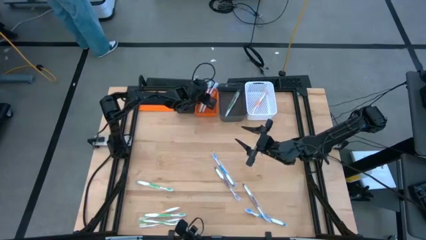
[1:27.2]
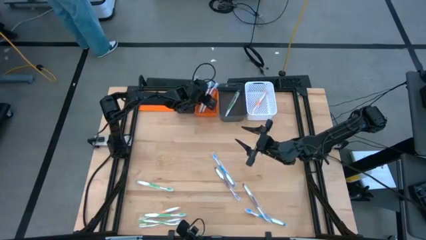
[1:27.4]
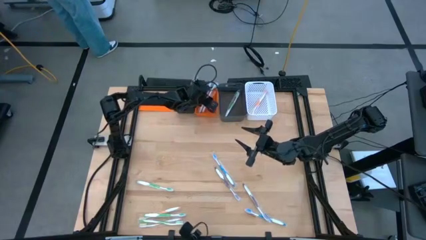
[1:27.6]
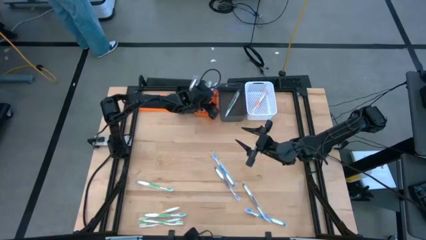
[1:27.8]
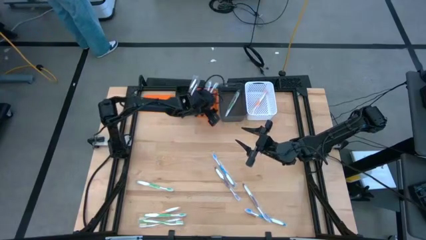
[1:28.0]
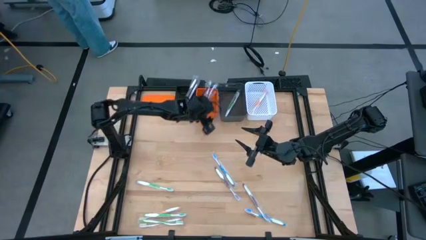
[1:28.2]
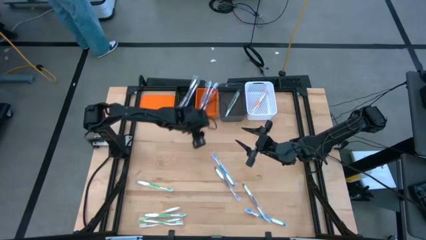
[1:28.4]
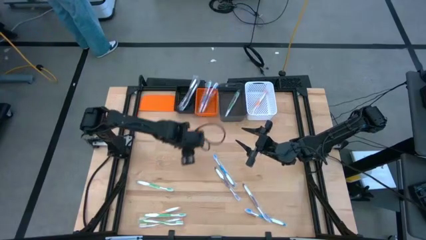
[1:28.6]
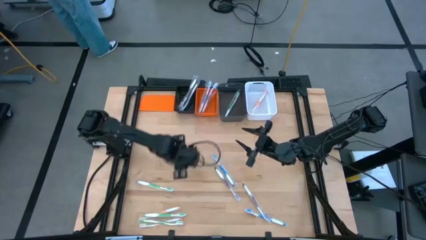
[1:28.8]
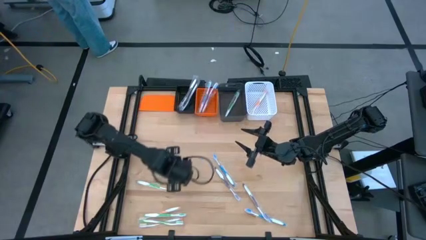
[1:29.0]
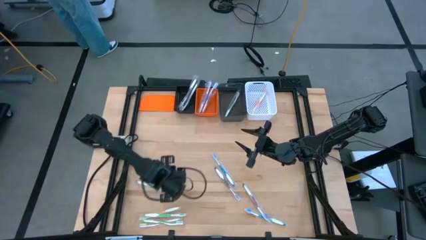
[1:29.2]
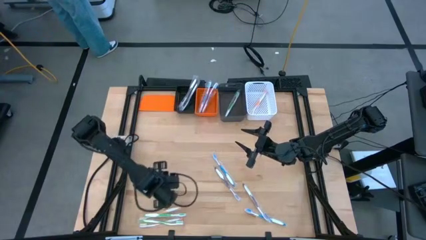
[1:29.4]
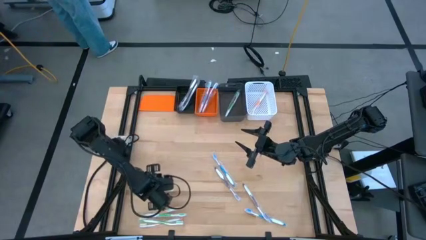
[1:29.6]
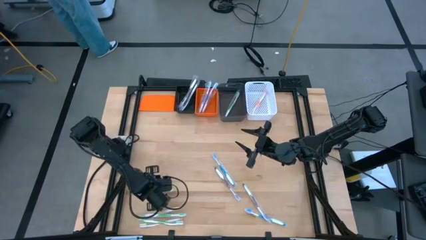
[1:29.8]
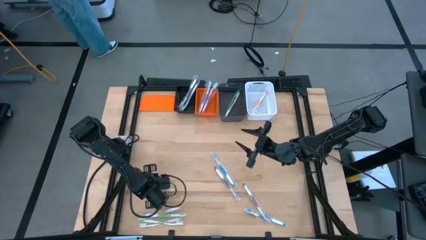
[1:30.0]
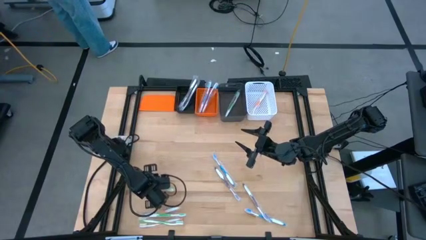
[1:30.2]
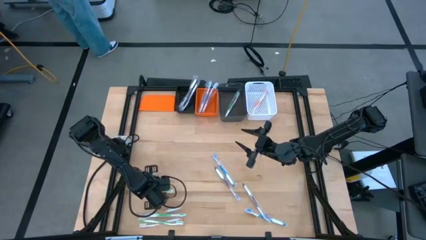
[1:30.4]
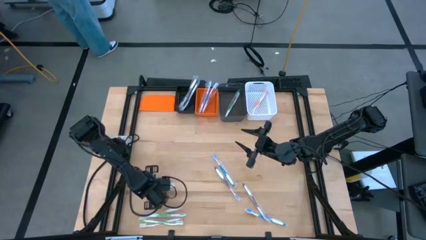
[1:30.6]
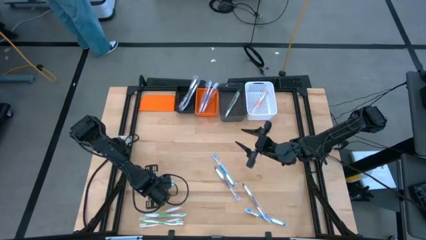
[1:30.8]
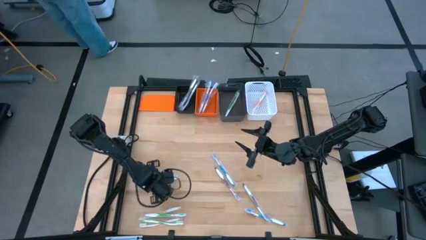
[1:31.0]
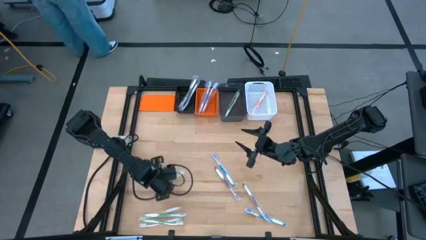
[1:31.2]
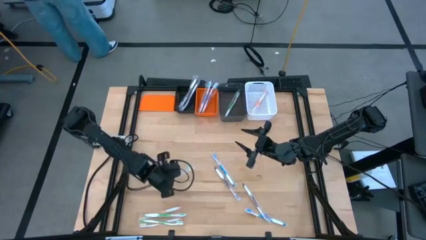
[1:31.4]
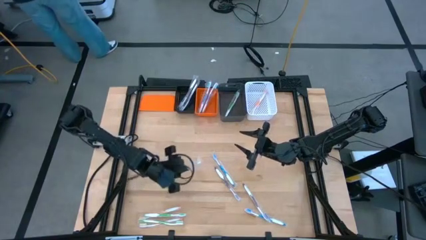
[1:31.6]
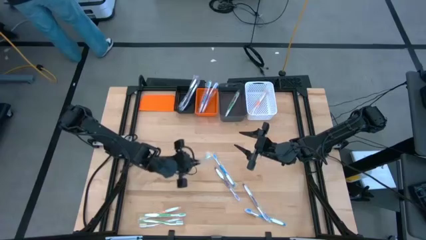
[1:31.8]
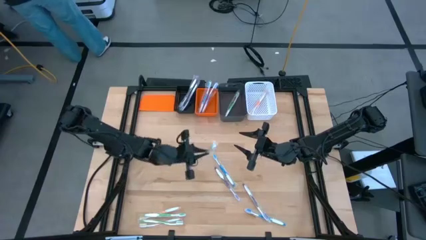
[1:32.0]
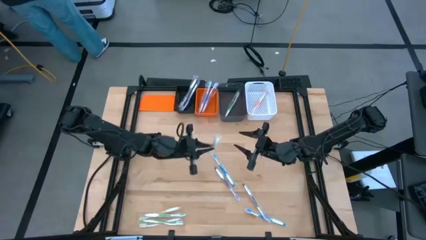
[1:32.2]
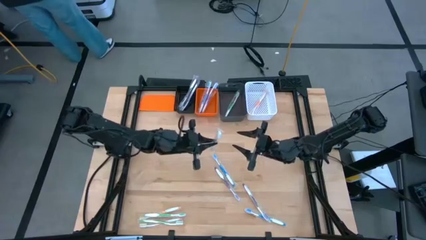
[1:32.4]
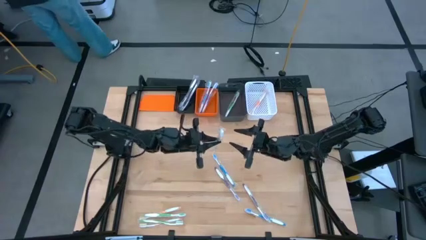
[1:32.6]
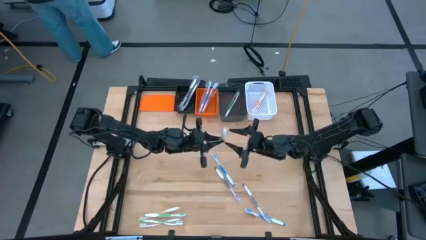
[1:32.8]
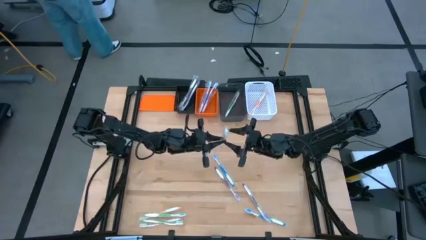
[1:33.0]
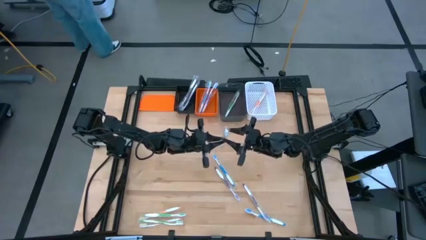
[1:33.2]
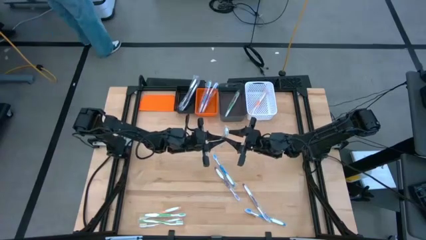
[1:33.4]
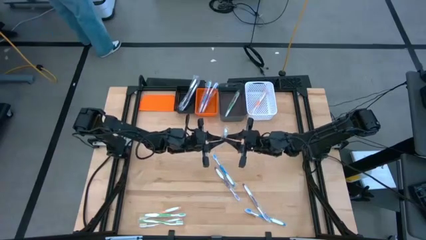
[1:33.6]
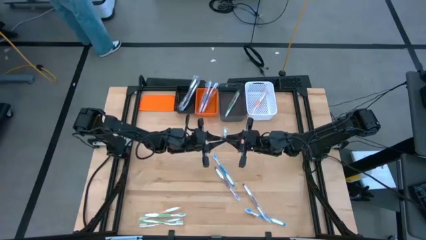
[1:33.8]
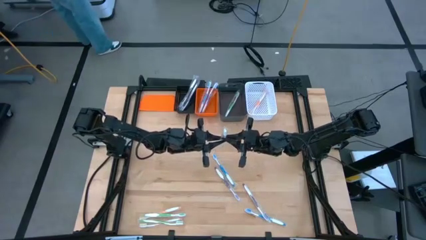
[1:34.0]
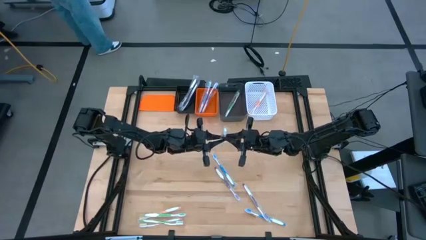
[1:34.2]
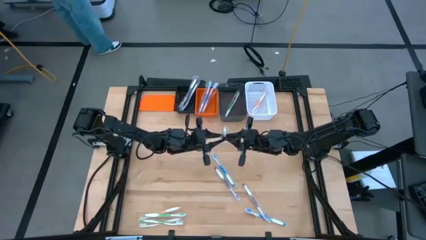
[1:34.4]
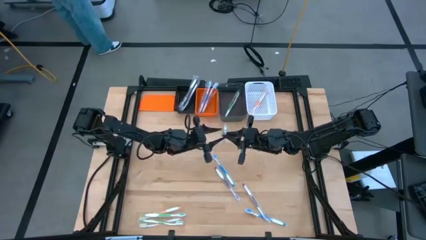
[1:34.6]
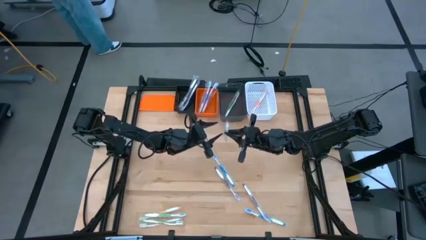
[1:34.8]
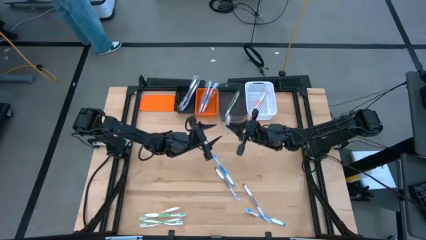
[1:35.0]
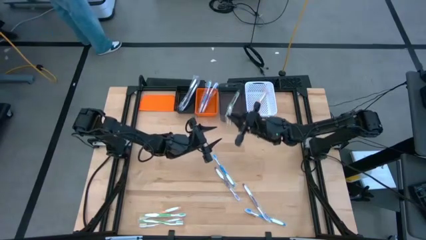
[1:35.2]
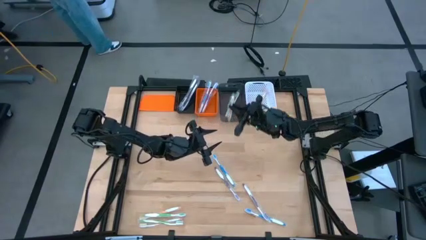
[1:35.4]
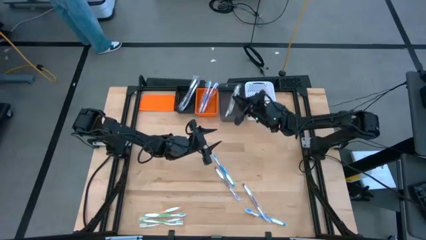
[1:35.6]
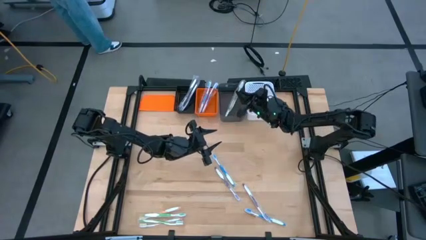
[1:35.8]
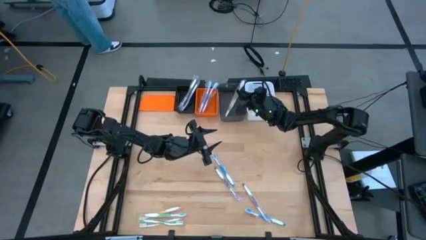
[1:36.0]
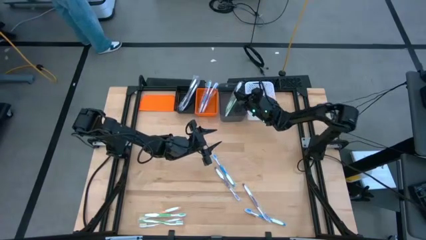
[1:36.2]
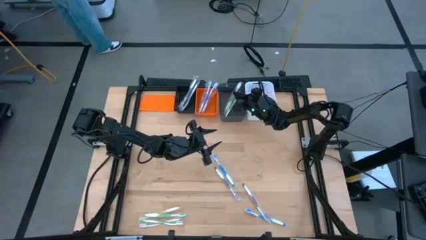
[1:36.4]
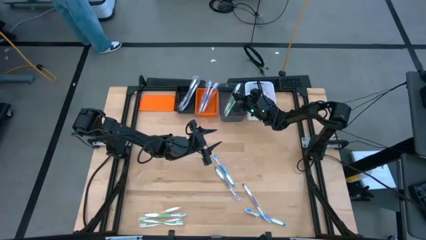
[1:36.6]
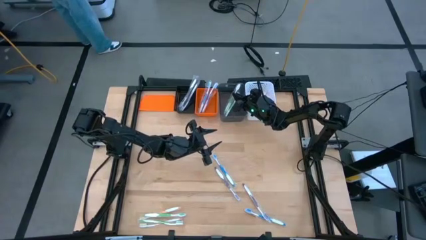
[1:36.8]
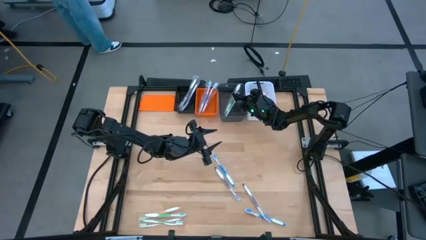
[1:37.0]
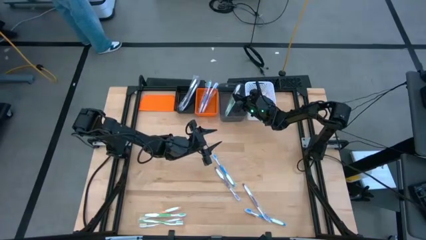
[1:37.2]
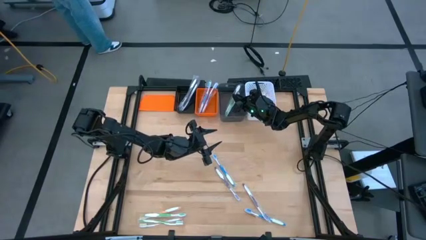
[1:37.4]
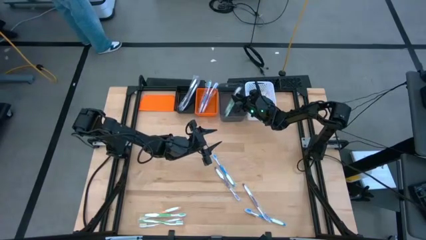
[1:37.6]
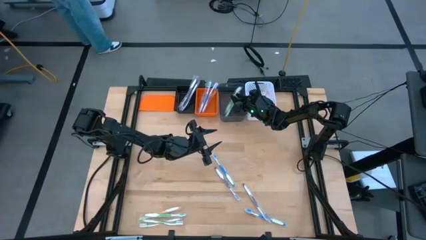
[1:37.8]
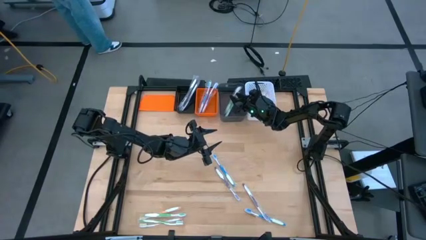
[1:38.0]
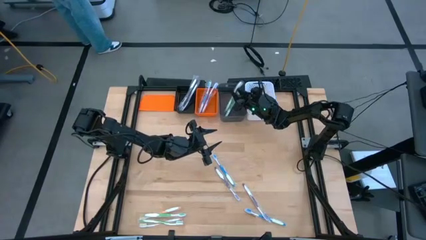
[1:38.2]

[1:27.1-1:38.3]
Task: Pick & Place Toothbrushes
Put the green toothbrush into the gray bin

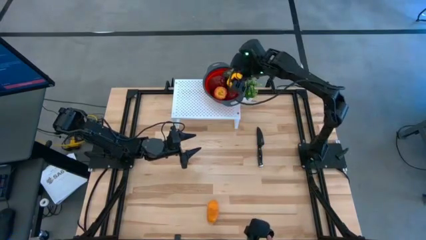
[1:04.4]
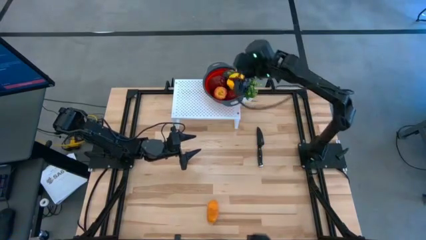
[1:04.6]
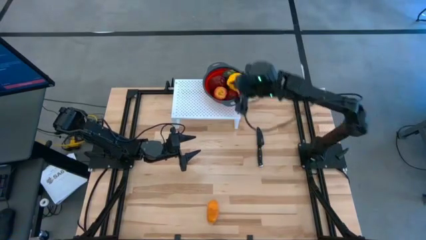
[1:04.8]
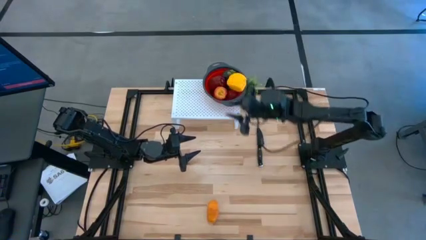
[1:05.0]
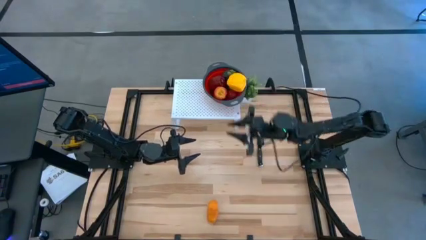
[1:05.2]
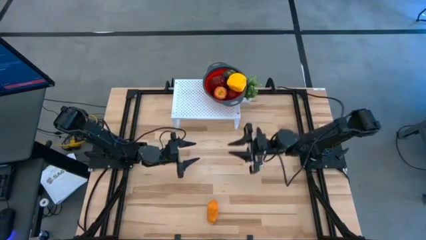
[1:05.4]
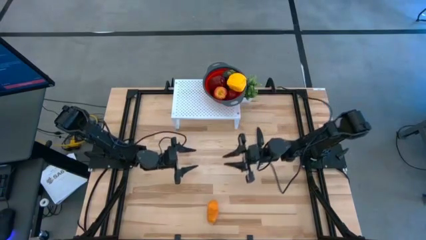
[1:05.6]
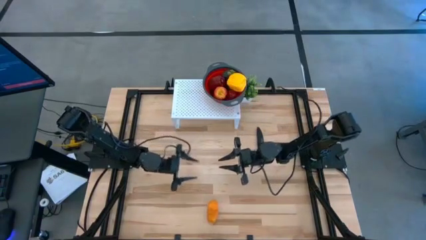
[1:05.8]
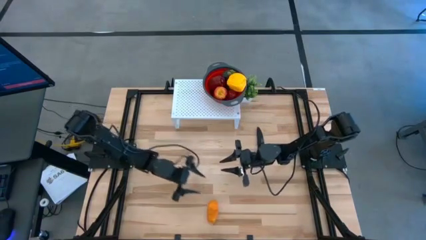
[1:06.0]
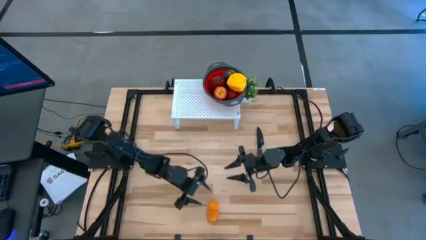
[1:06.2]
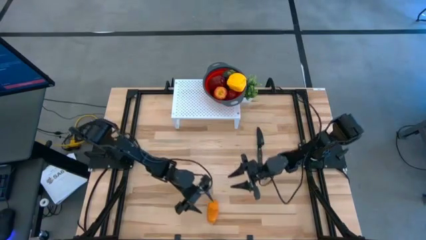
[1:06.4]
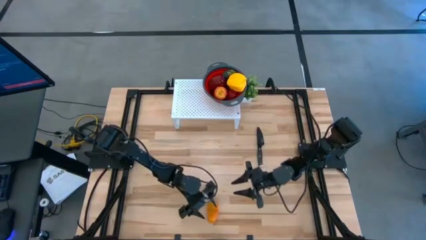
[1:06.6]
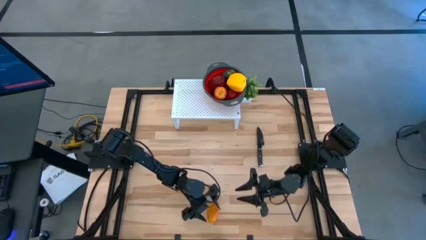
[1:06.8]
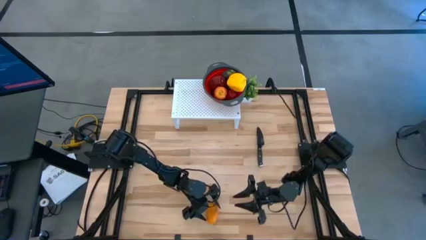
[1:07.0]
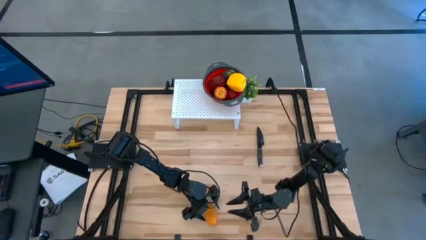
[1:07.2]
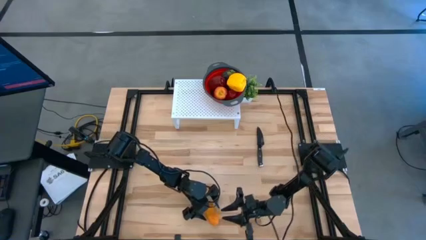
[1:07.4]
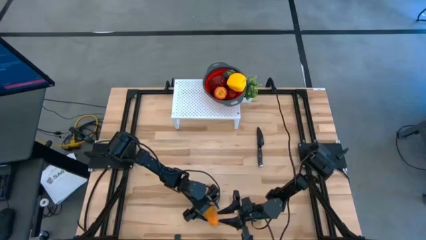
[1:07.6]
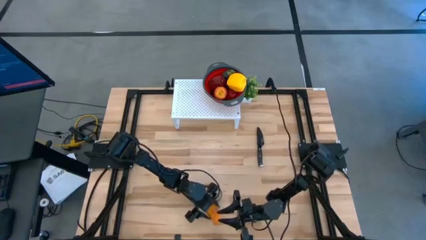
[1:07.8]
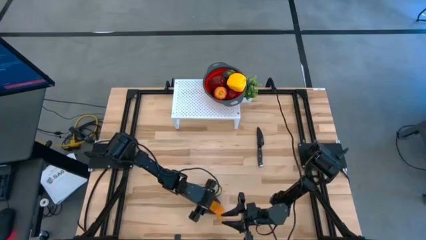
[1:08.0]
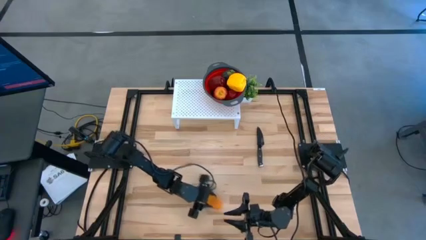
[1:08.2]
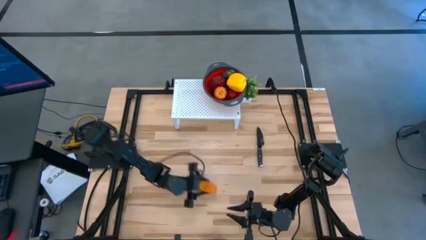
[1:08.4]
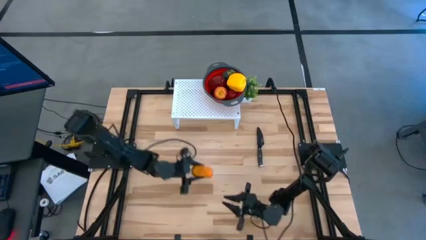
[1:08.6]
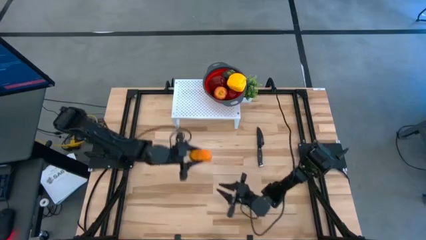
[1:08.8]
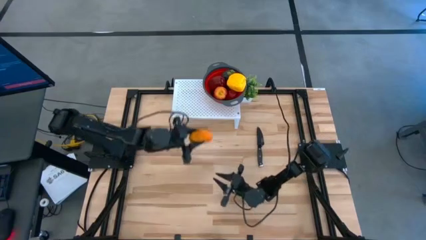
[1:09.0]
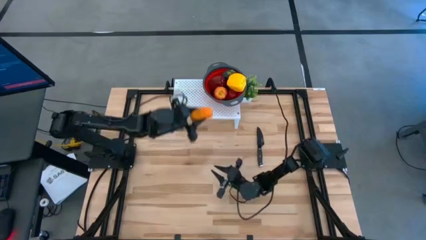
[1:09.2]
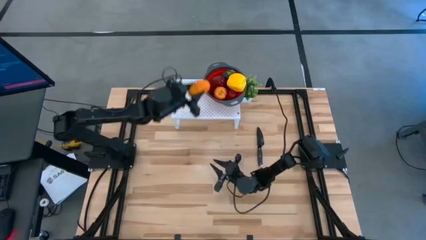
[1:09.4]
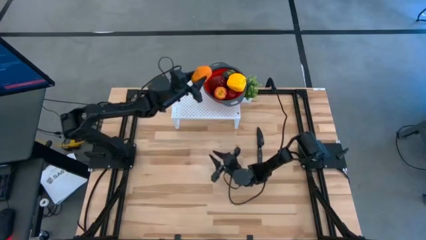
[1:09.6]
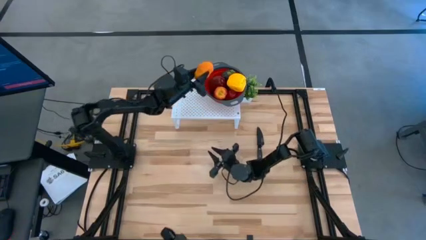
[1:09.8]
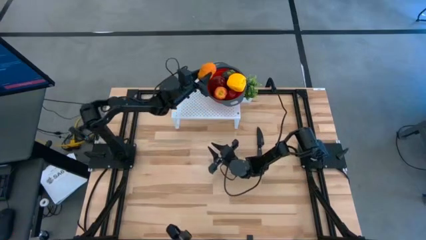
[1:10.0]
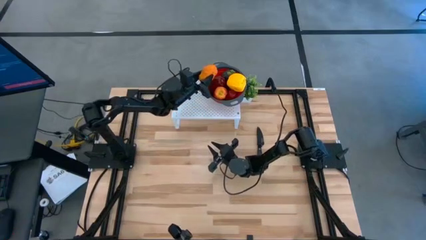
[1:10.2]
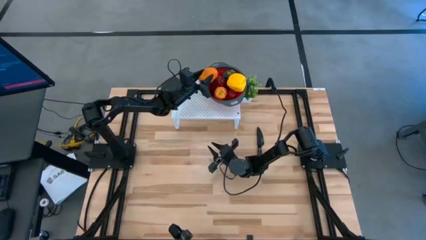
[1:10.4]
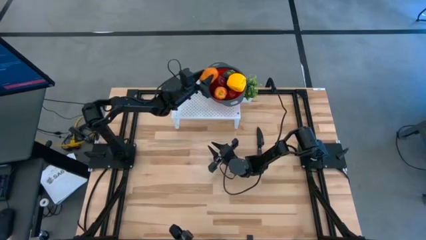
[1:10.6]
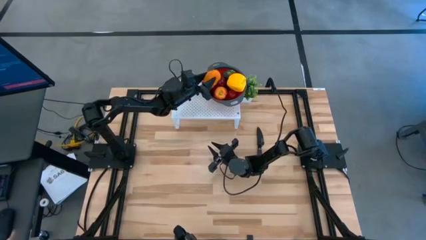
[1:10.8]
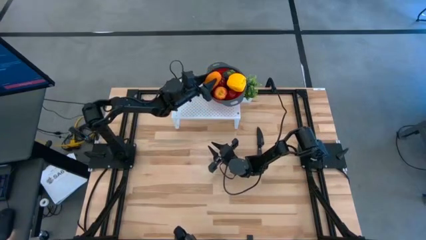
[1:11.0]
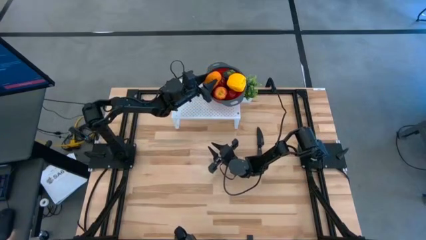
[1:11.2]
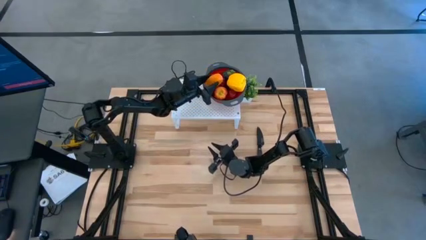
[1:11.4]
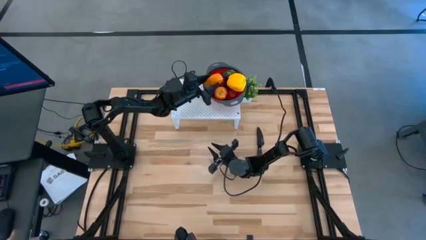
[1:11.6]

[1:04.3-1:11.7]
Task: Pick & Place Fruit
Put the yellow potato into the red strainer bowl
